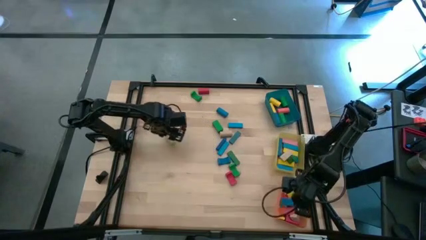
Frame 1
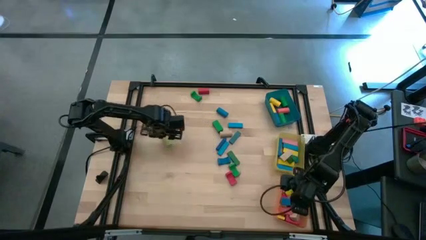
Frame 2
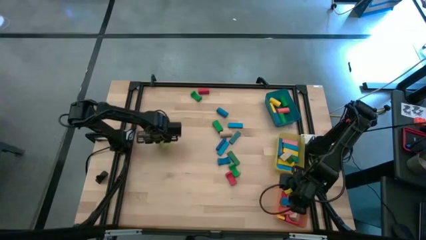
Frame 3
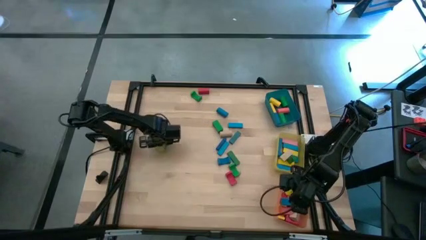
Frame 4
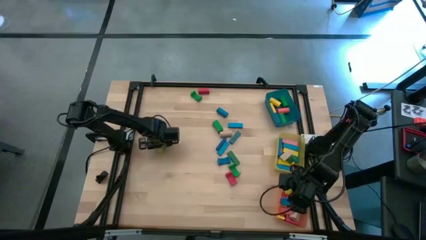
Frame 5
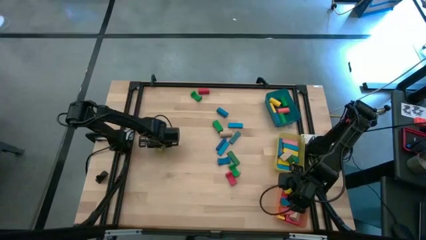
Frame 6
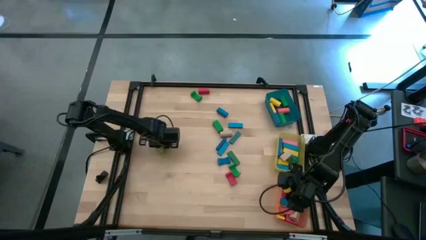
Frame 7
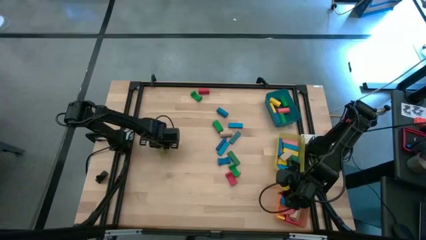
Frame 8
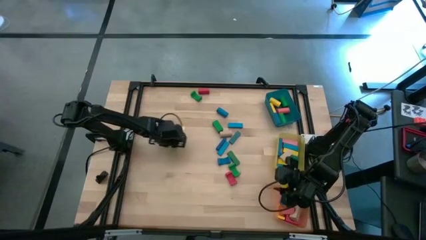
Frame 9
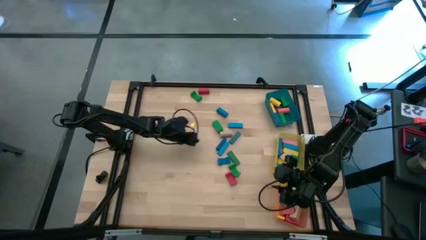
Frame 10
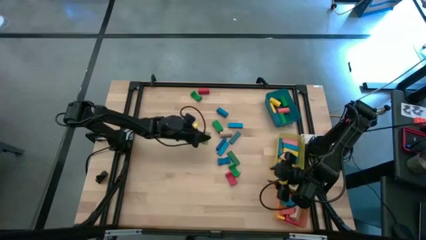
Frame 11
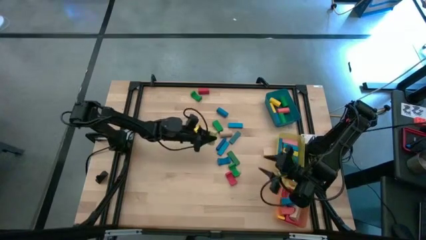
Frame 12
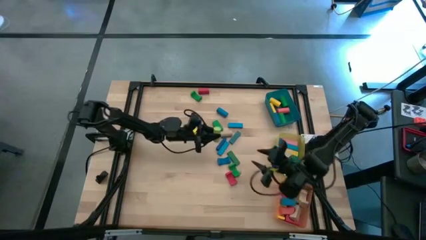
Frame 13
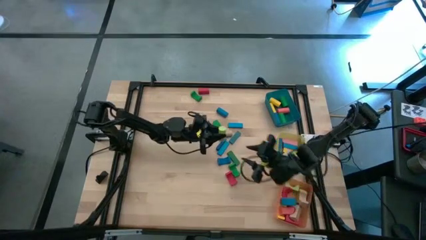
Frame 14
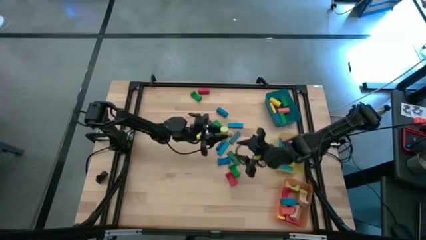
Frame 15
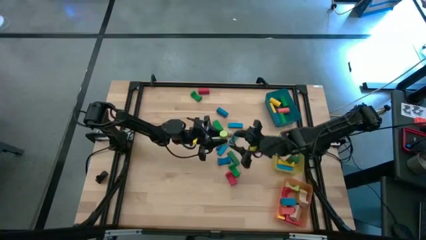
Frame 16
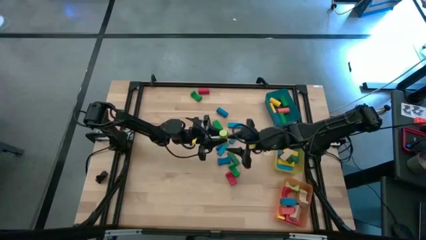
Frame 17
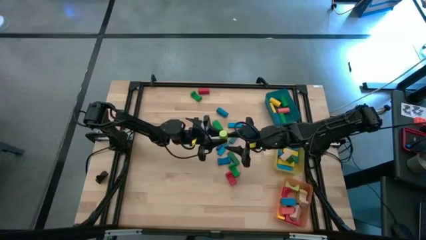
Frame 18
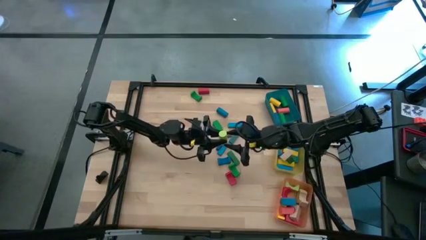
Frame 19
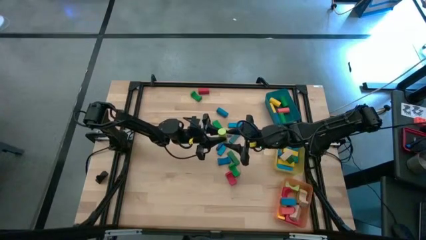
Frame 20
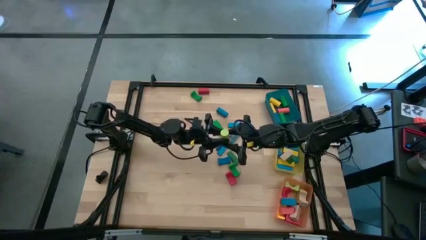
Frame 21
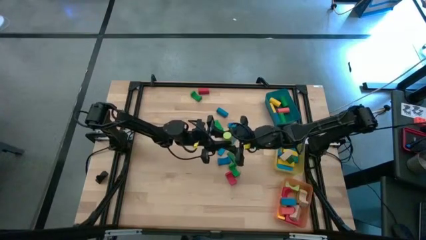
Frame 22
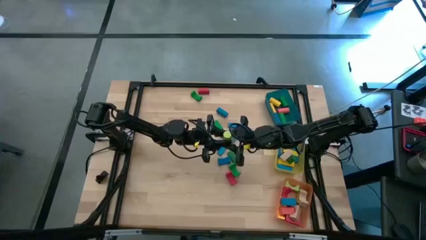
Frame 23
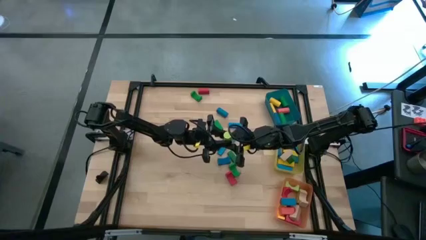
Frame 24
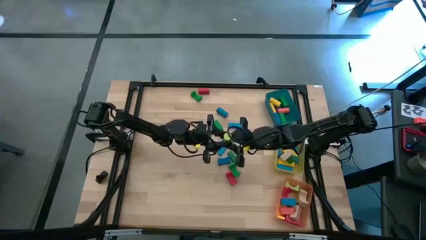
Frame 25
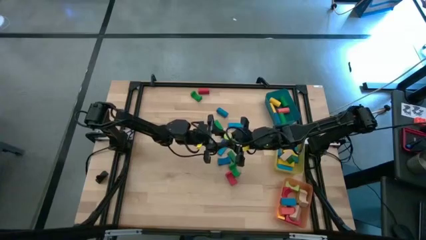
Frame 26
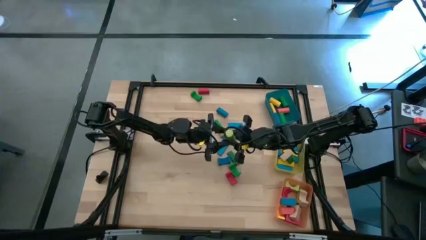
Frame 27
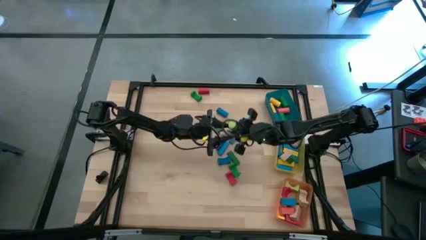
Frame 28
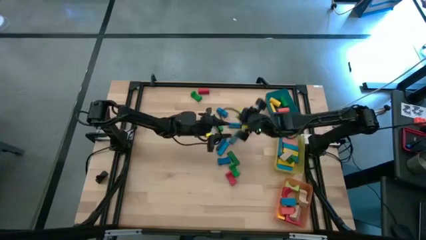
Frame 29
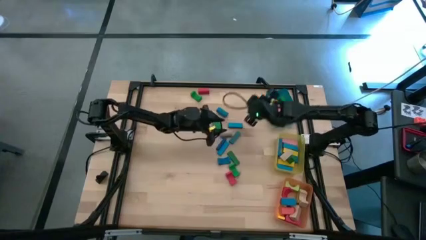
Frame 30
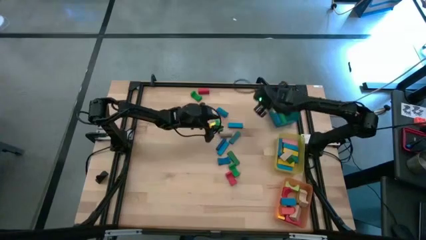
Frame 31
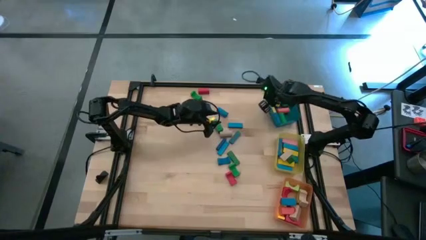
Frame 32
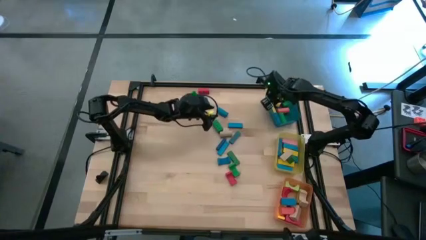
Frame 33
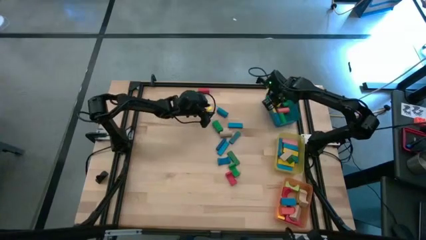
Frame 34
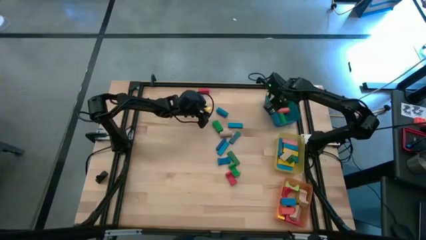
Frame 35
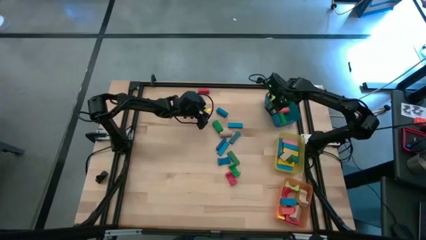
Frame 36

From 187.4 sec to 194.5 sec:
Task: Sort blocks by size
Put the light green cylindrical block into the blue bin

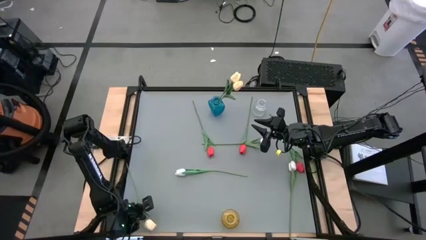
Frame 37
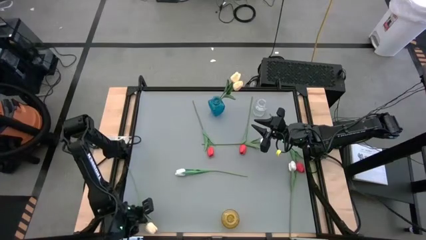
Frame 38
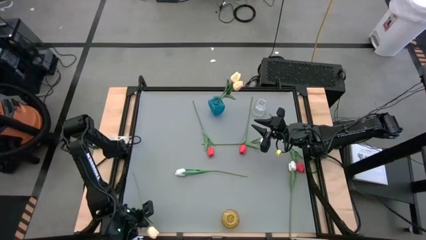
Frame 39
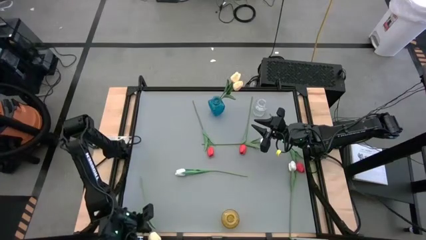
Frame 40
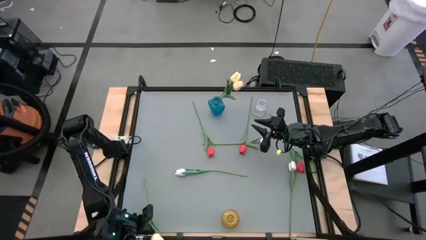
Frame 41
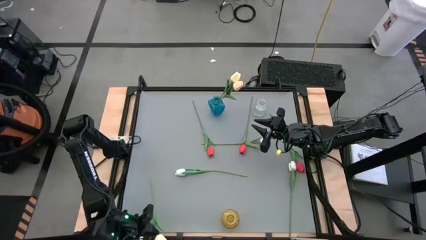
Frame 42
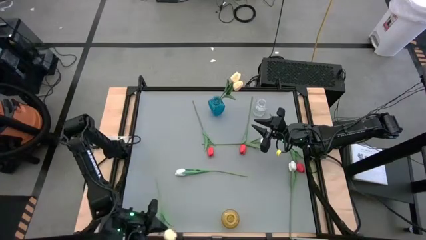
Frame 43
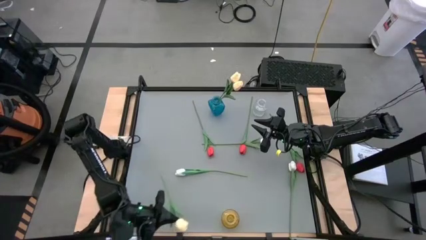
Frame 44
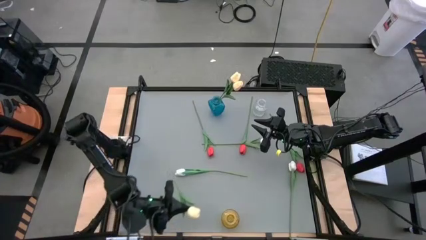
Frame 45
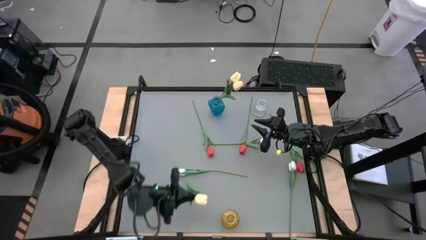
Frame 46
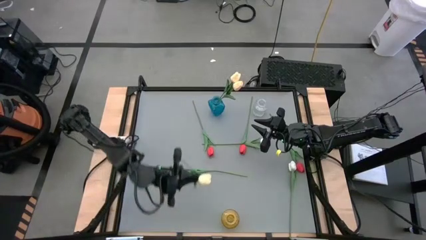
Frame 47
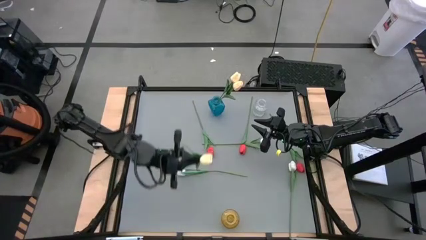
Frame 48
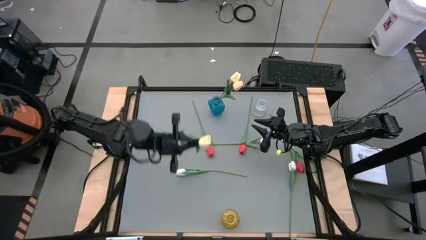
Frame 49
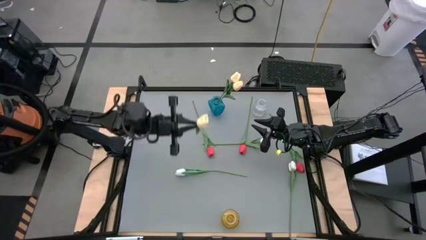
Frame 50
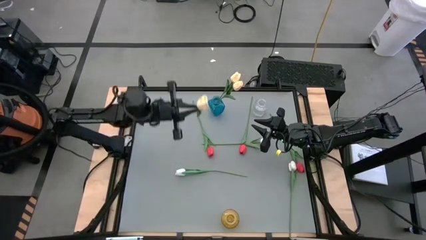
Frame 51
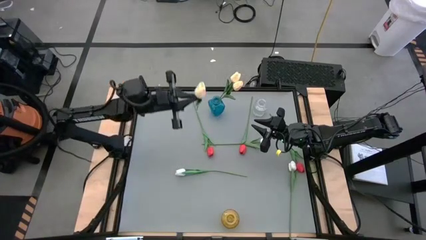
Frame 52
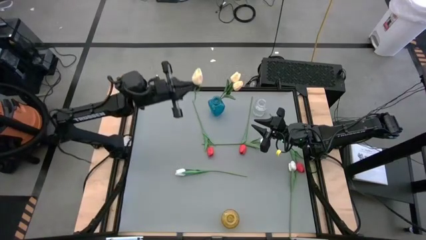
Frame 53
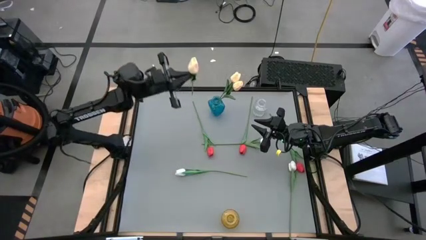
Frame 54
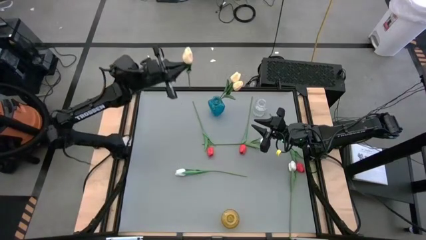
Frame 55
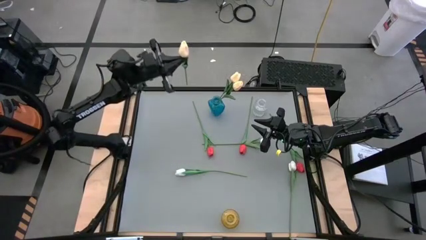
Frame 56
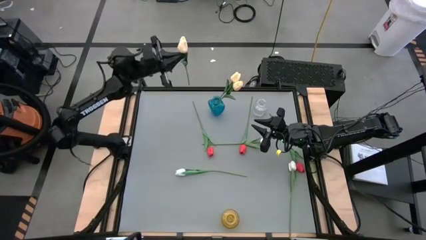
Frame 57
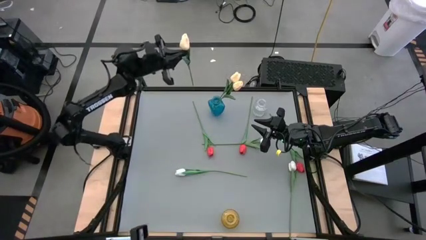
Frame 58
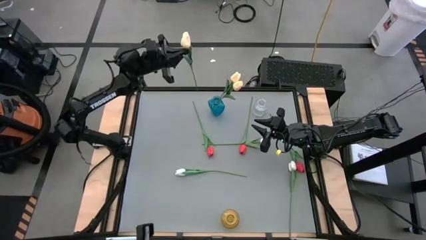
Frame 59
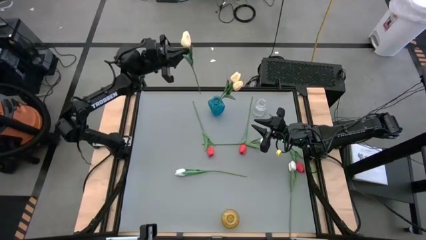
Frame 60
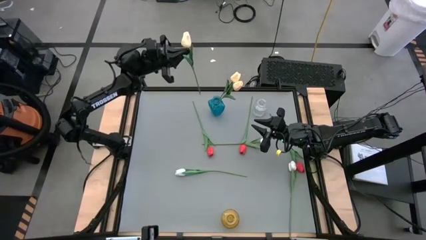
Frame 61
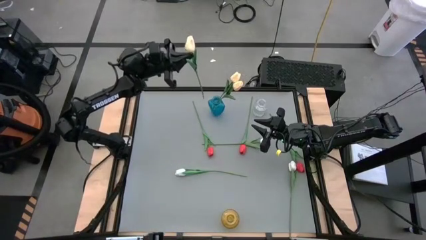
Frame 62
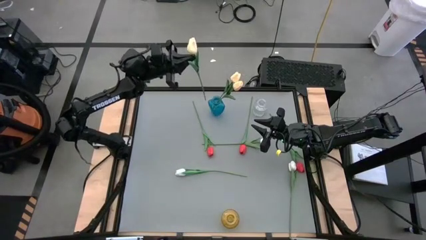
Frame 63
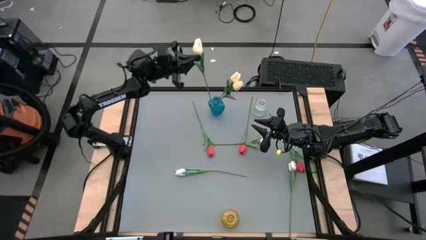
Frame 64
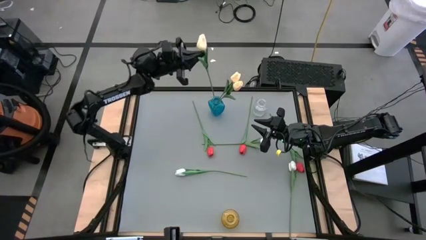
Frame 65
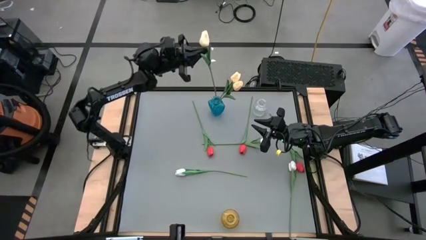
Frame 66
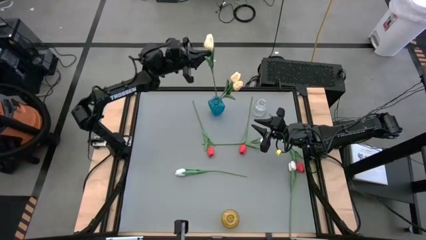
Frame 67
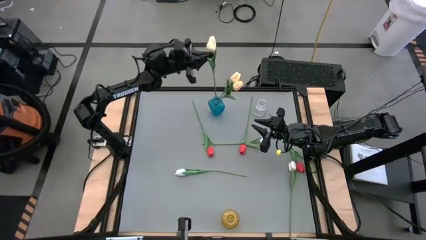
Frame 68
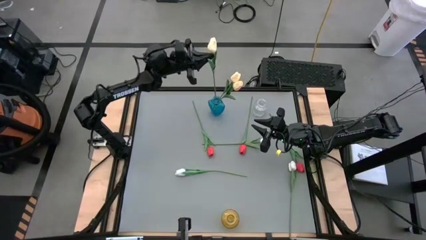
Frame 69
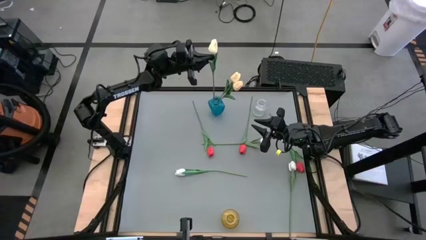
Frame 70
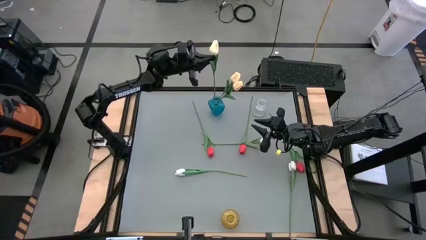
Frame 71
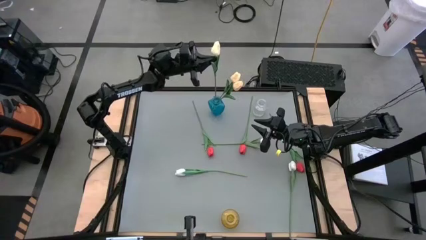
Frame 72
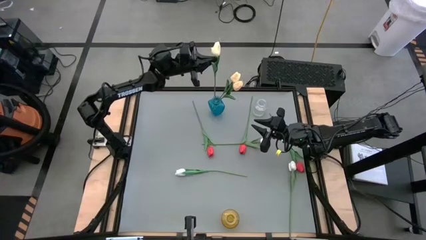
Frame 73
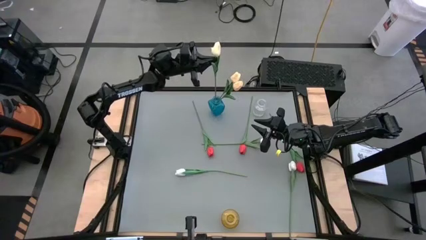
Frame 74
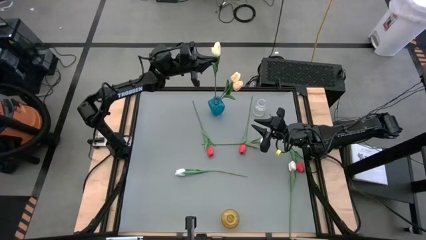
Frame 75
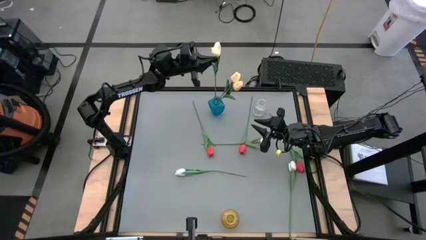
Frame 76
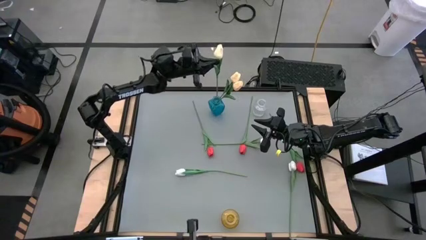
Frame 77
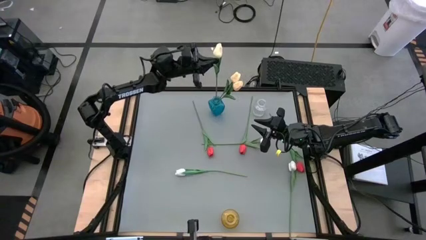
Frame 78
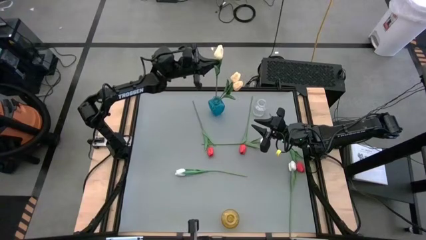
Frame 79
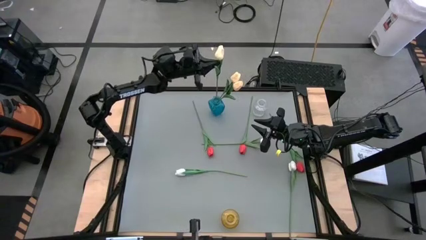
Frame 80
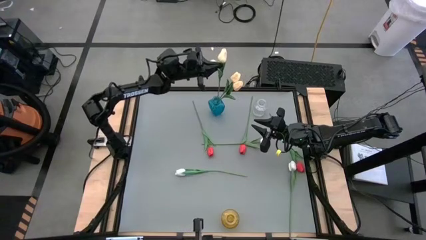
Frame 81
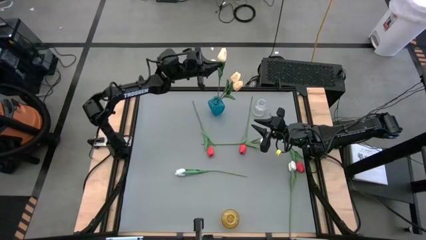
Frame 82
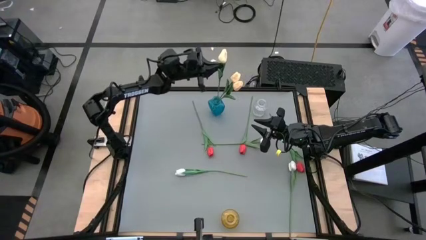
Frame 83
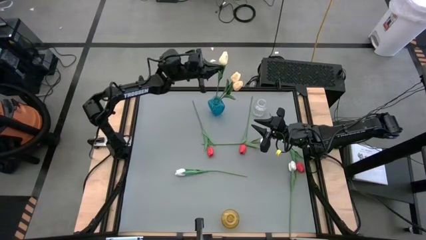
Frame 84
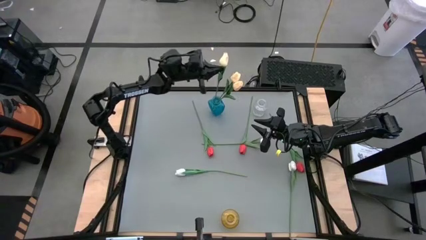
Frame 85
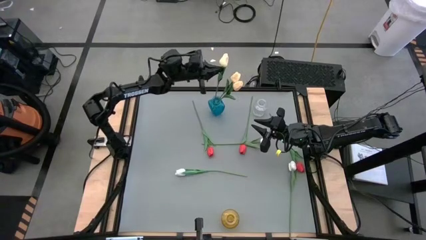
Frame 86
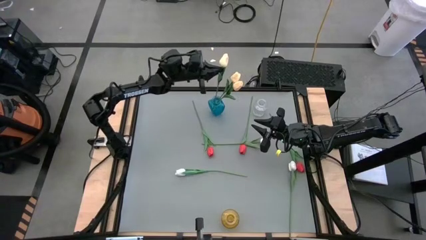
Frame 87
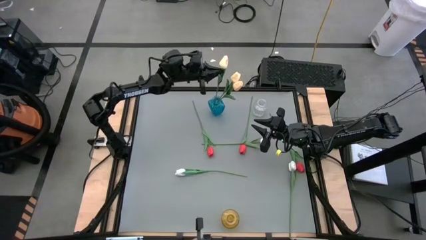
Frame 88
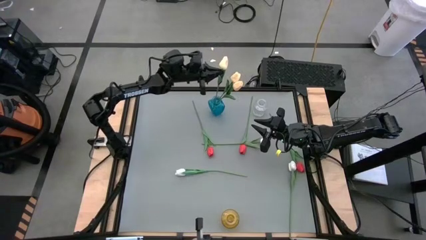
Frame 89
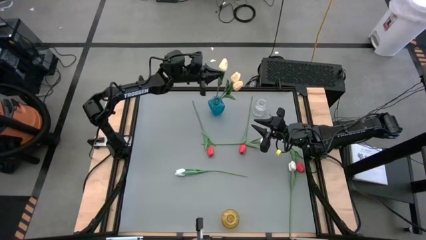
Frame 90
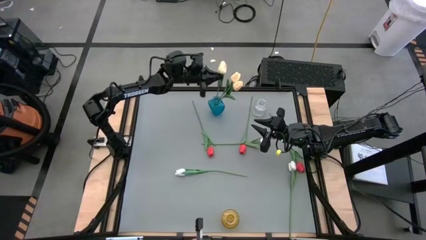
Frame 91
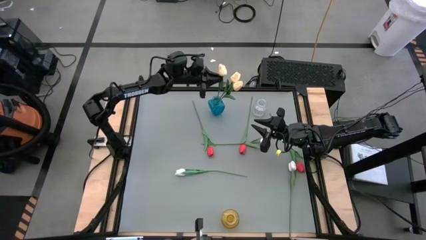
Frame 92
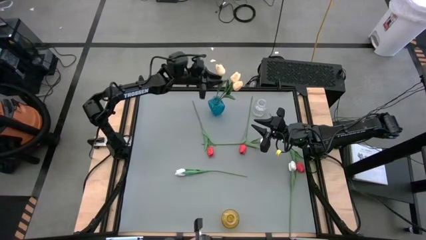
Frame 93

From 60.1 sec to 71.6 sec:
Task: Sort flowers into vase by color
Put the yellow flower into the blue vase
